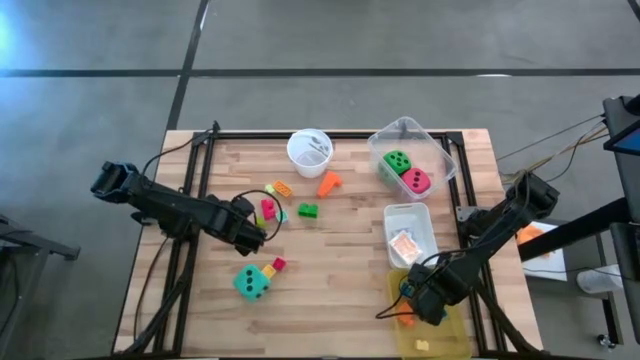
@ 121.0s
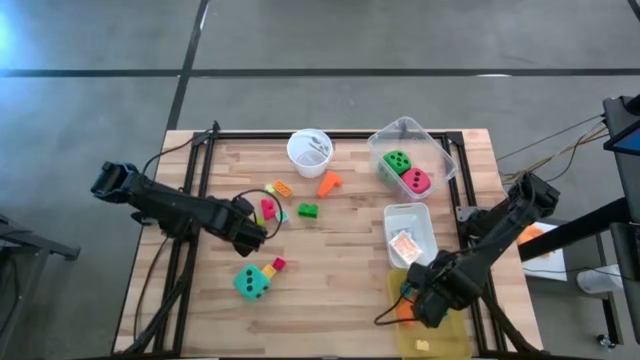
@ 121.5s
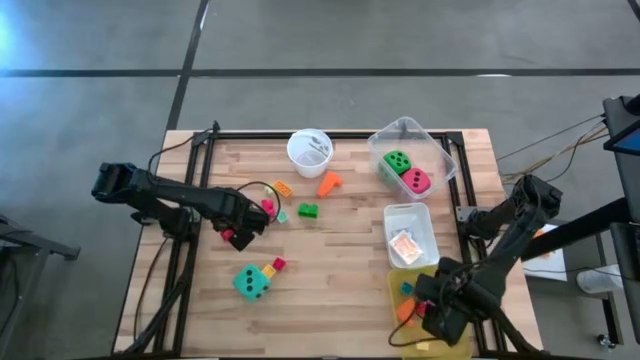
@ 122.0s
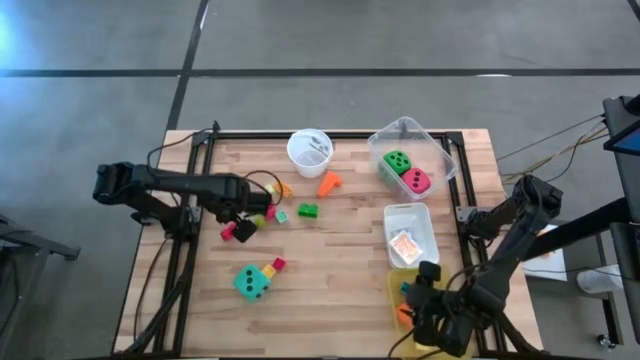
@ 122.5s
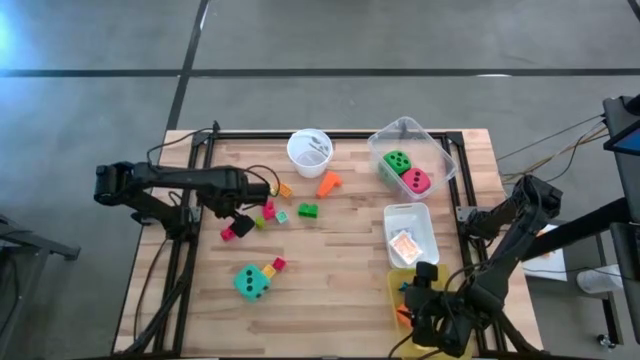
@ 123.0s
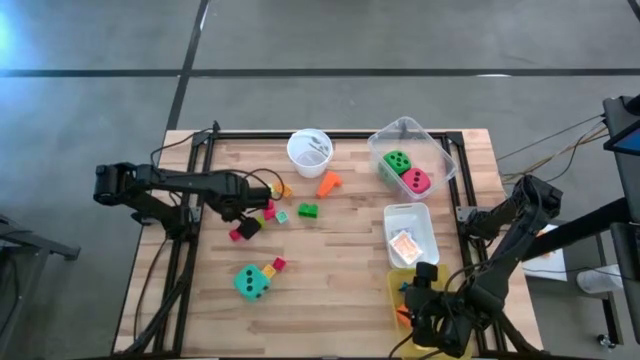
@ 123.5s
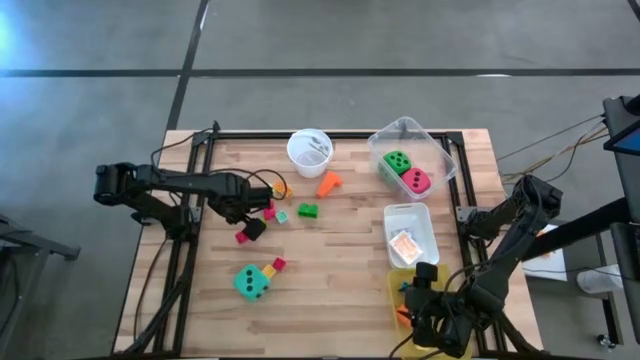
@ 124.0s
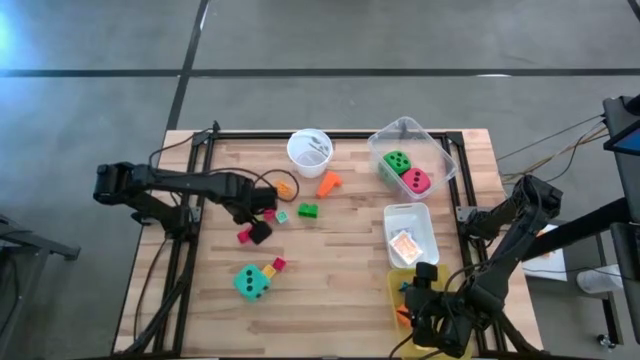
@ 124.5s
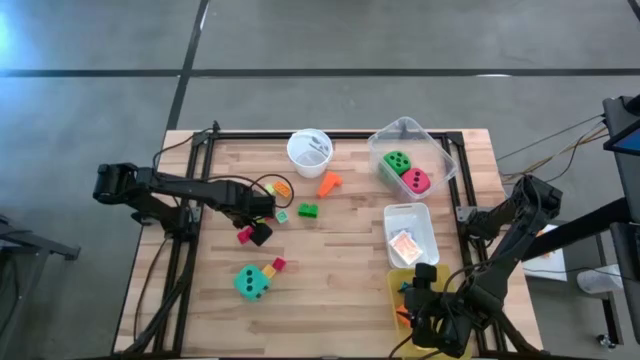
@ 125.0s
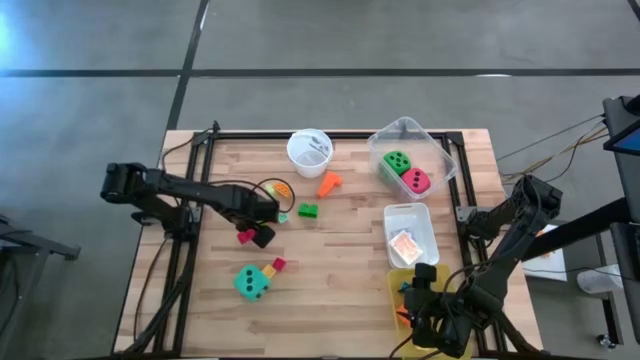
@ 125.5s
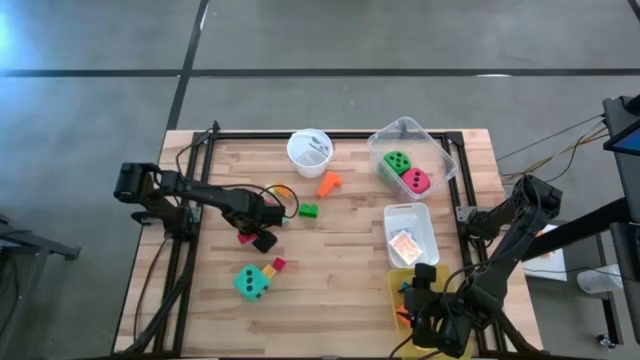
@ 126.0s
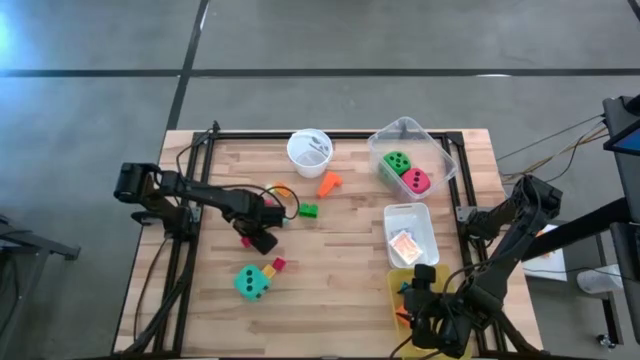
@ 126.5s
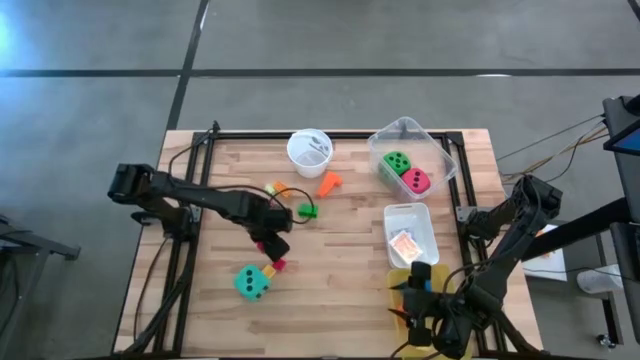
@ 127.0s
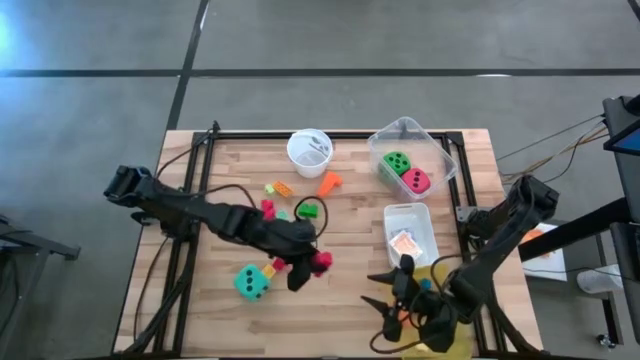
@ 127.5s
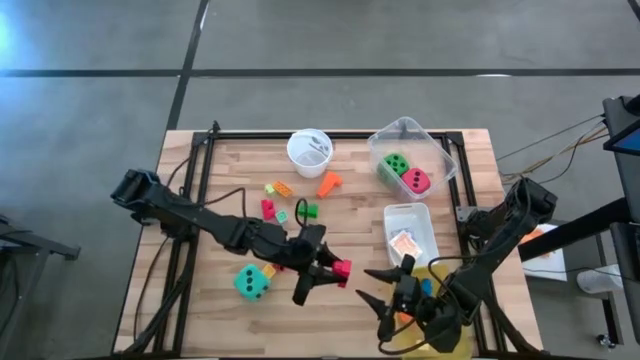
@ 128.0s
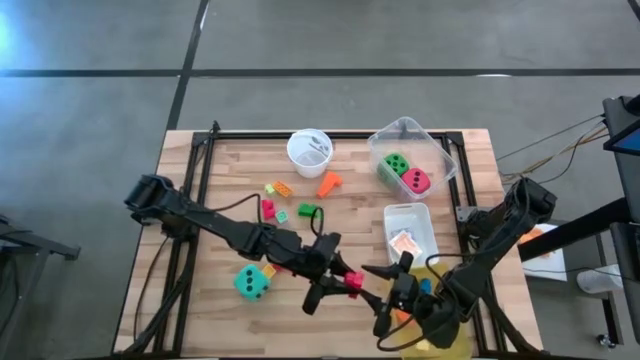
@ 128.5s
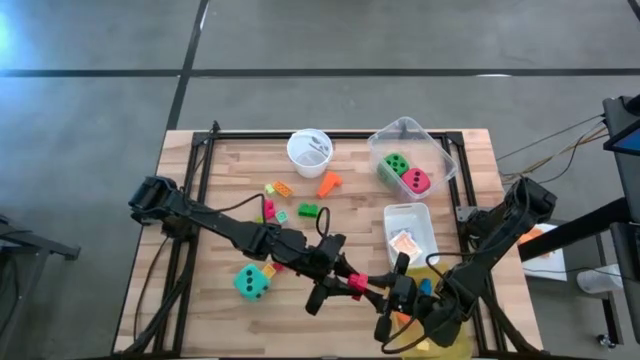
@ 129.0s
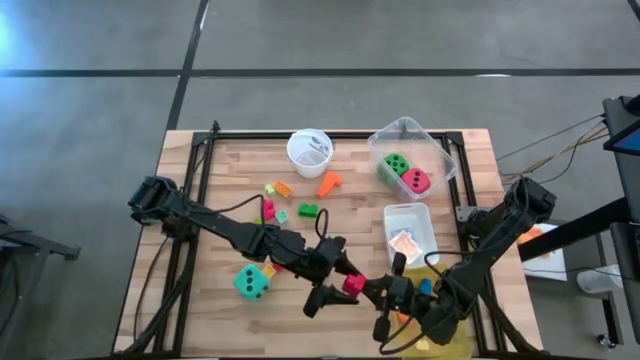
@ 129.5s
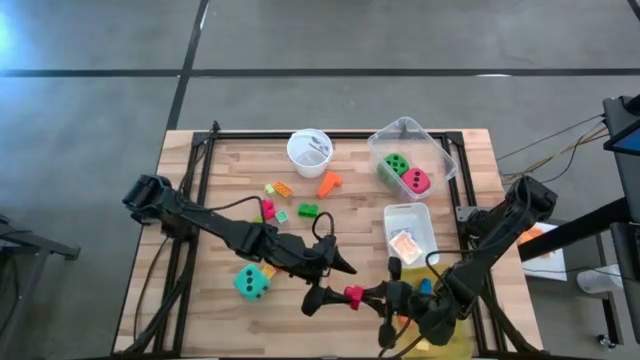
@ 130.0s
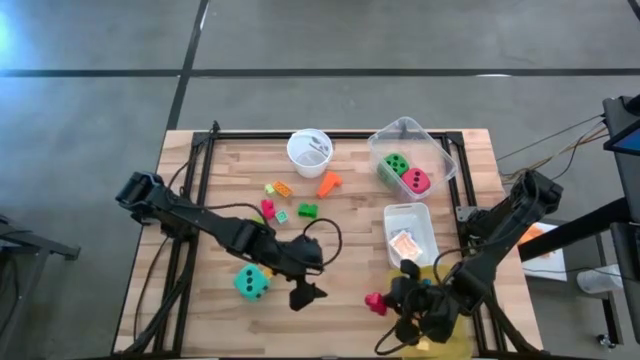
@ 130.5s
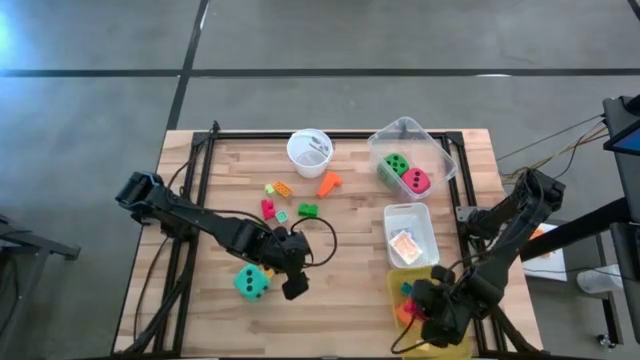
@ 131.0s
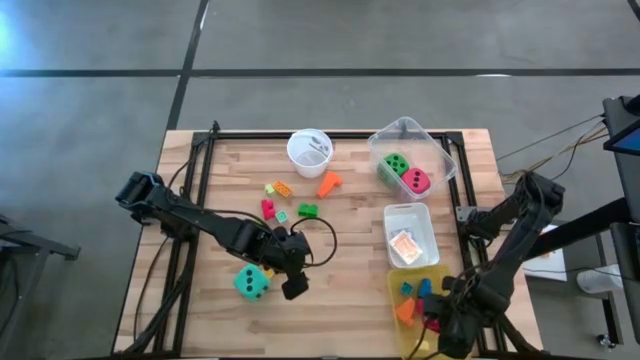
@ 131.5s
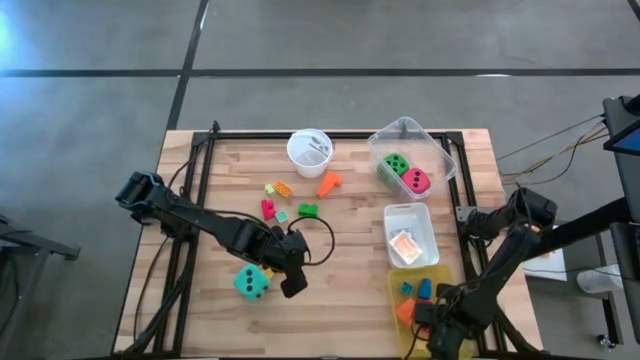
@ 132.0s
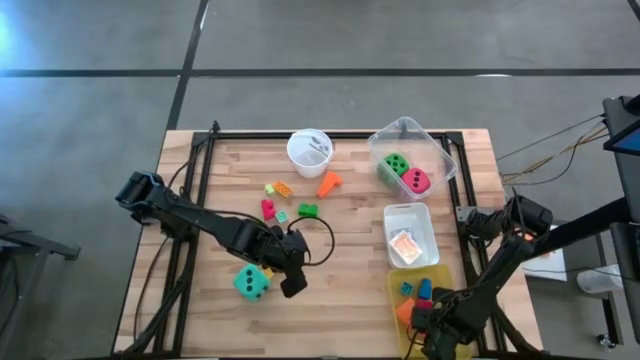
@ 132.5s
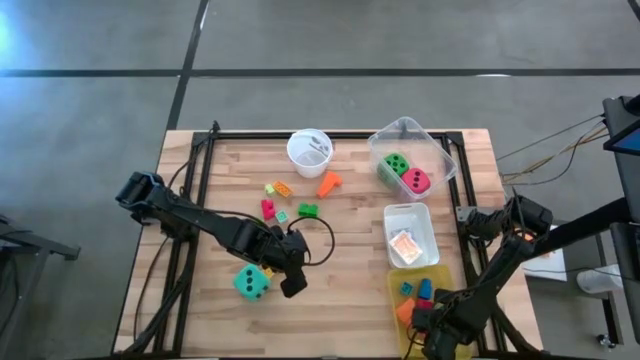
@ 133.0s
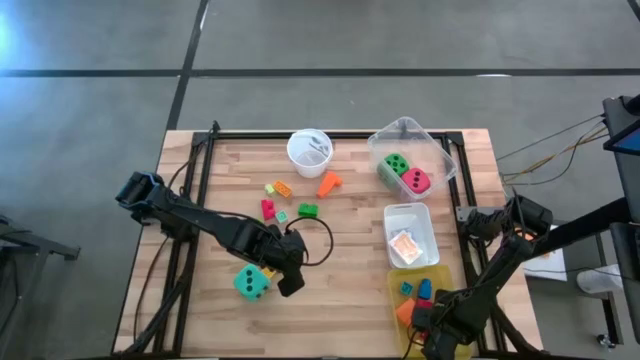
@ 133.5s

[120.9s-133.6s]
Task: Pick & Place Toys
Put the red game piece into the yellow bin

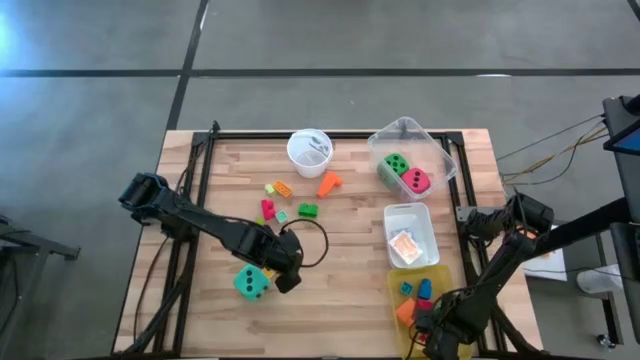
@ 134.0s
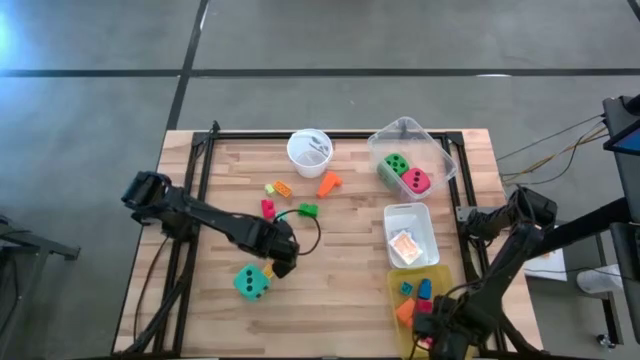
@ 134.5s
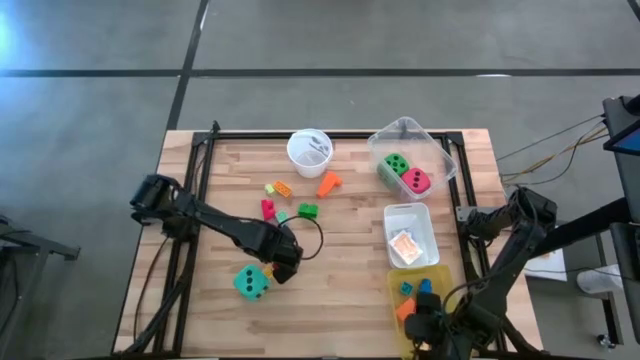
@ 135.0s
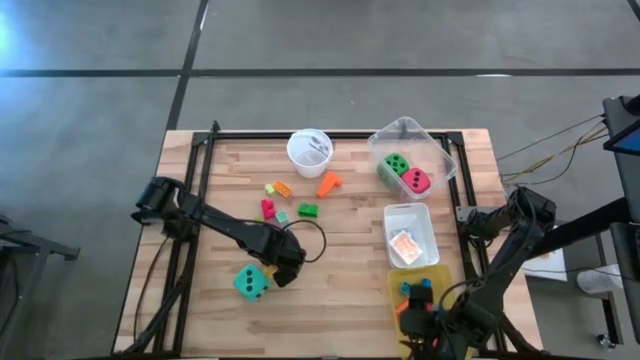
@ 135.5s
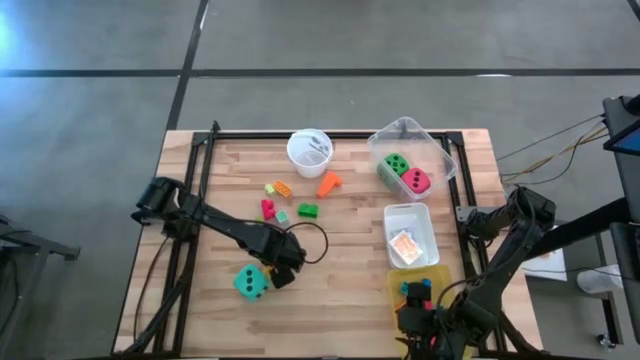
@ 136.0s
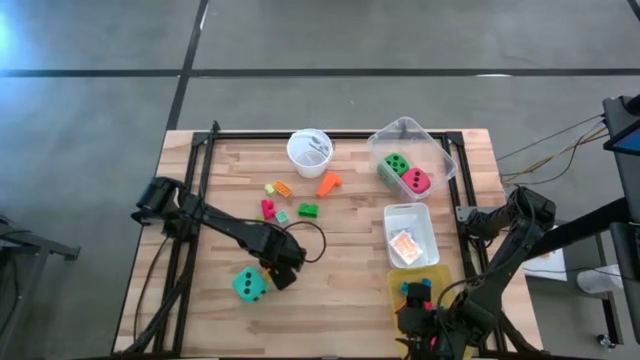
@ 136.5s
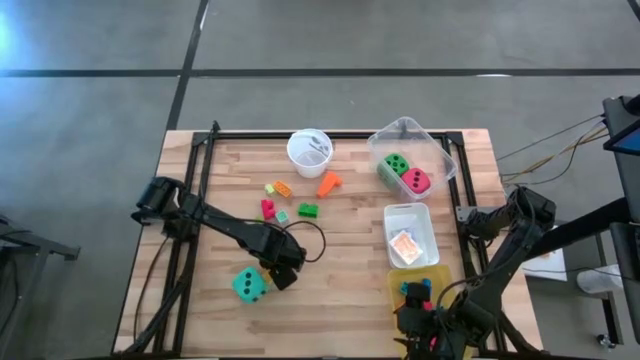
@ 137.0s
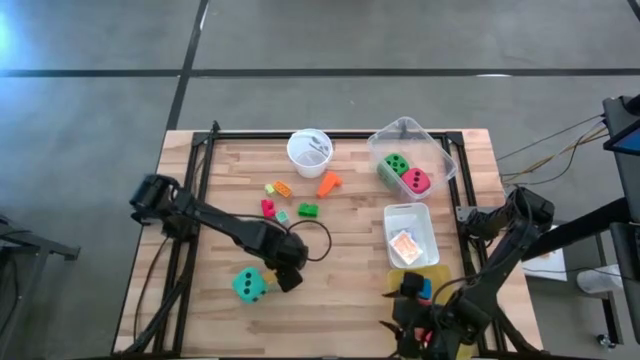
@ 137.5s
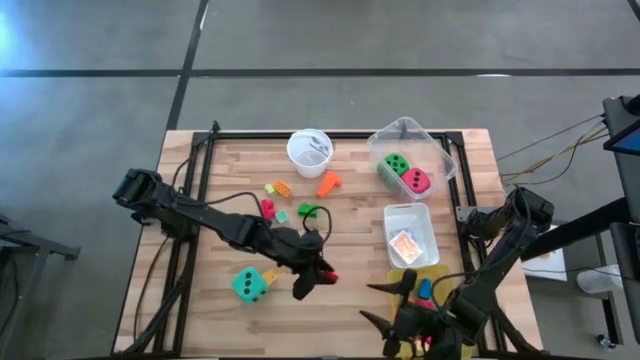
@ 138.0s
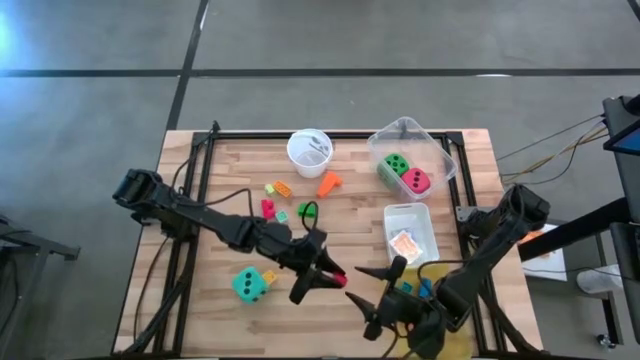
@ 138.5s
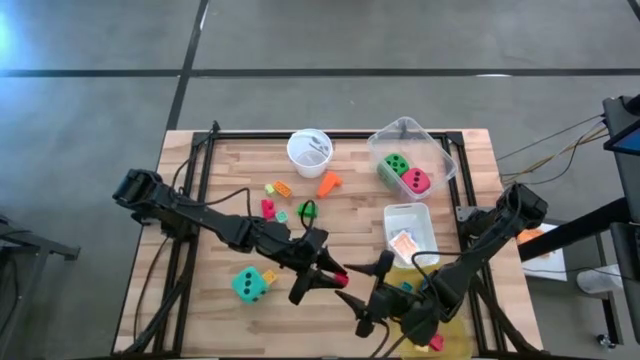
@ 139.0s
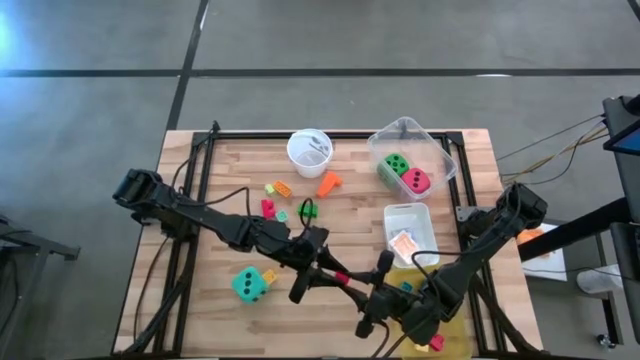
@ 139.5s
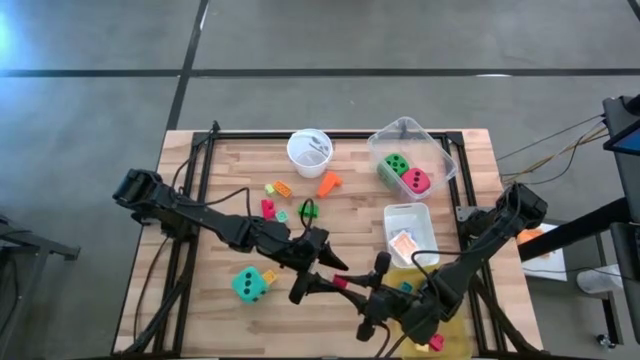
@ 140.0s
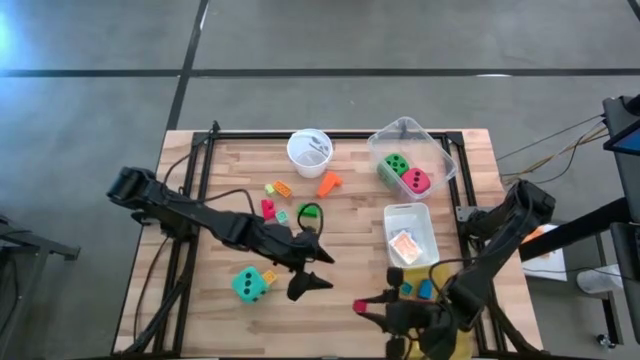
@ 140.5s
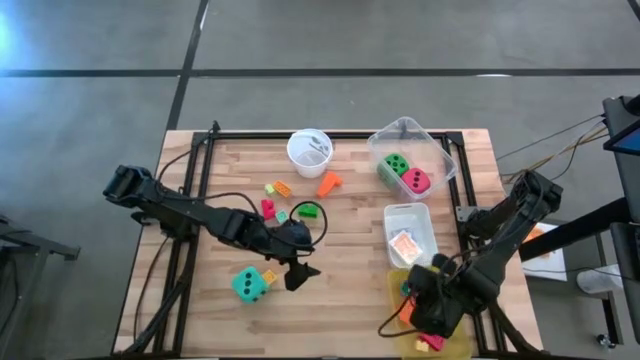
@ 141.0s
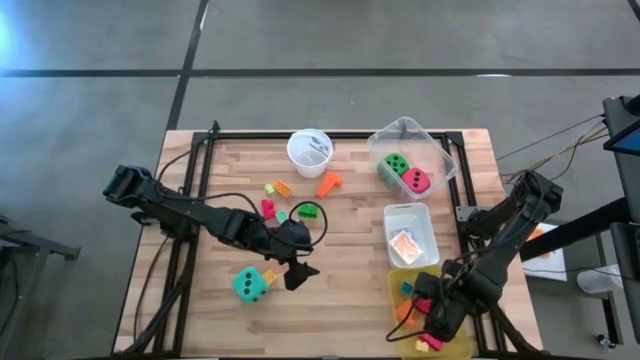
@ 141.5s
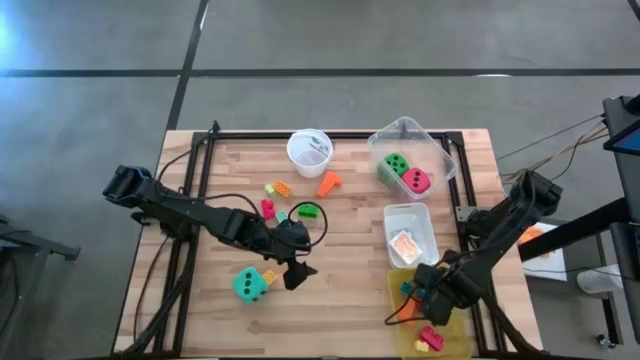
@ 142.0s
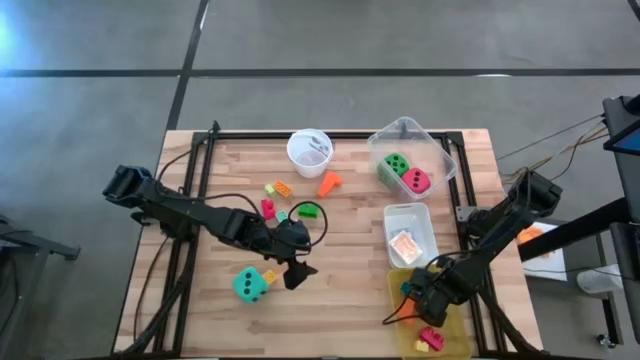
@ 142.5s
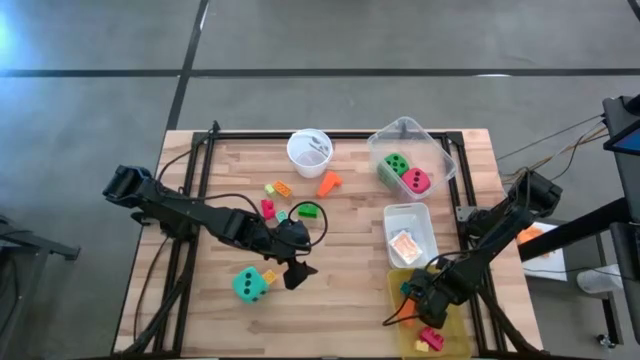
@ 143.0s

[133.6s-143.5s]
Put the red game piece into the yellow bin

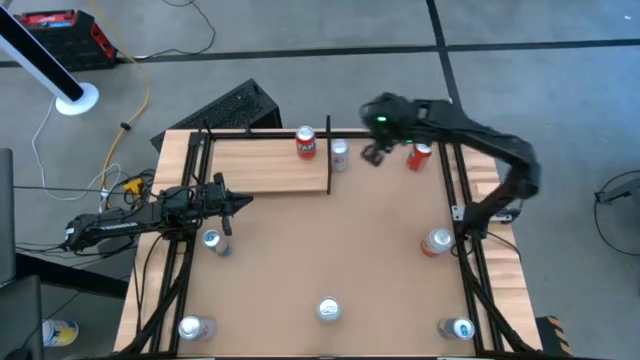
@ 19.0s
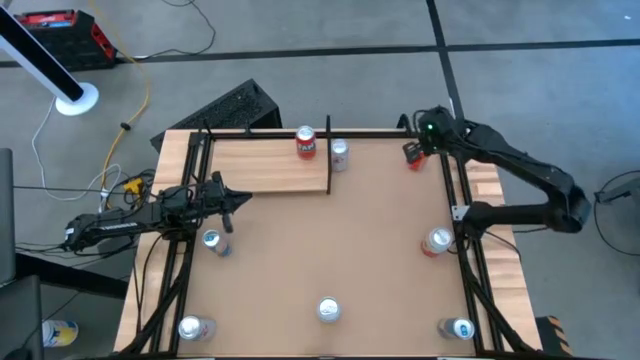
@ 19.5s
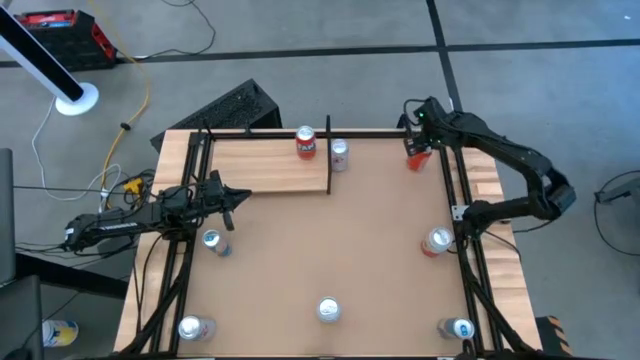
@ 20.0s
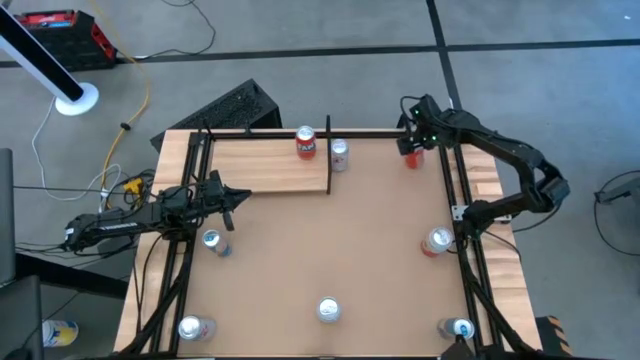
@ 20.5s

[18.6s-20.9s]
Task: Place canned beverage on shelf
Put the red soda can on the shelf aligned with the other red soda can
